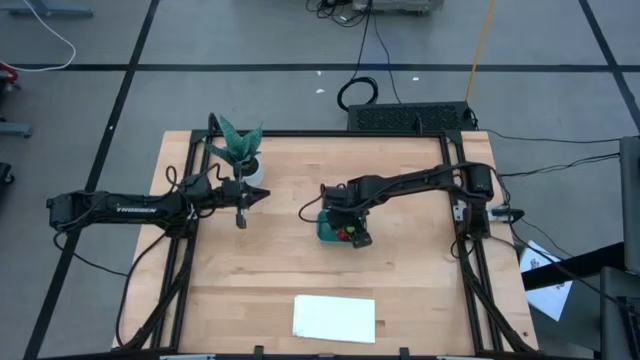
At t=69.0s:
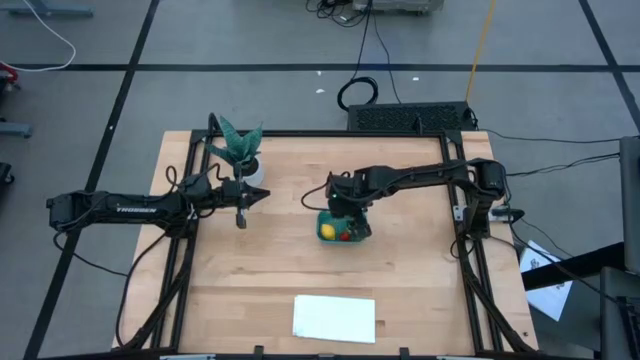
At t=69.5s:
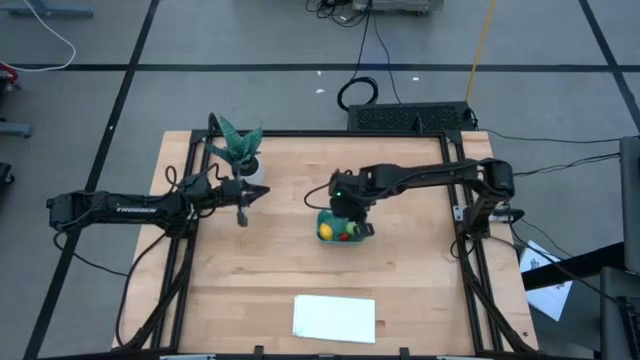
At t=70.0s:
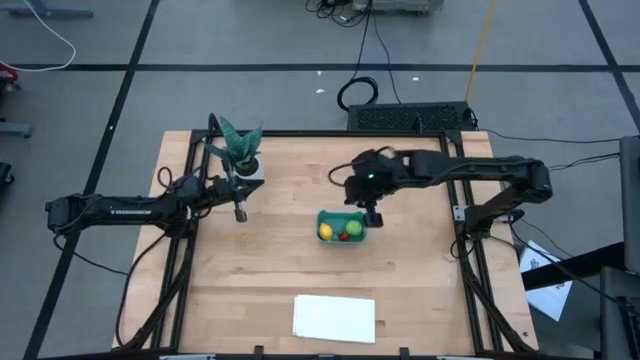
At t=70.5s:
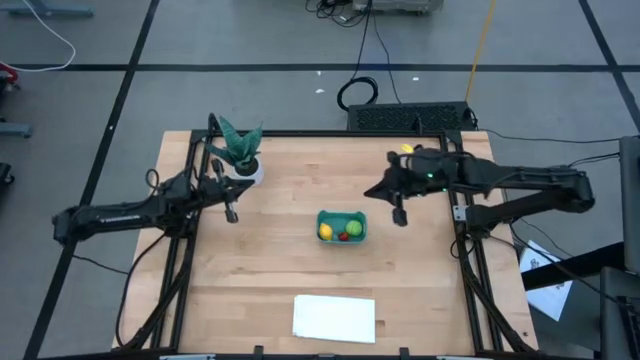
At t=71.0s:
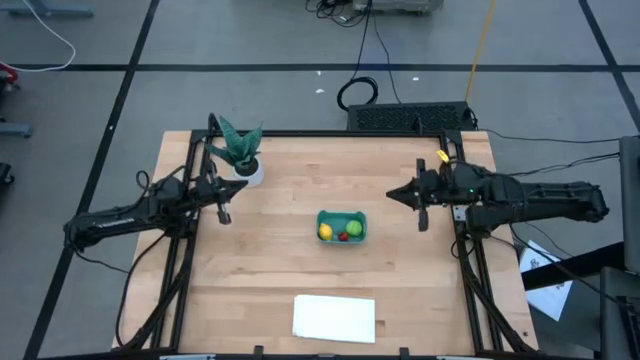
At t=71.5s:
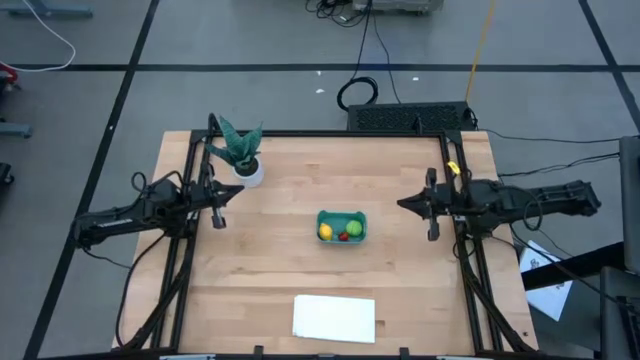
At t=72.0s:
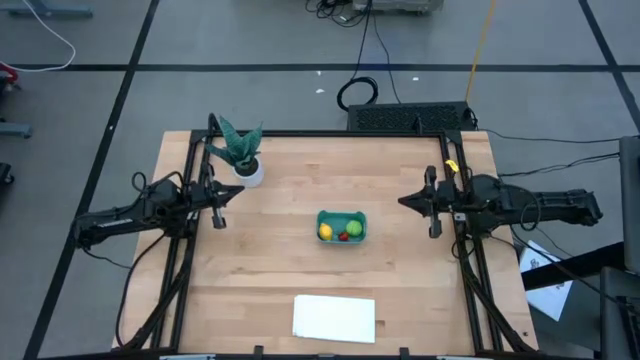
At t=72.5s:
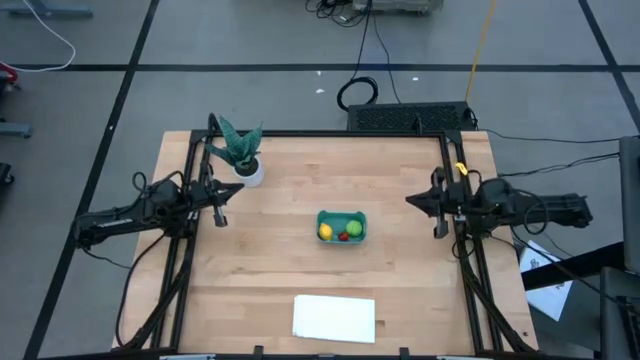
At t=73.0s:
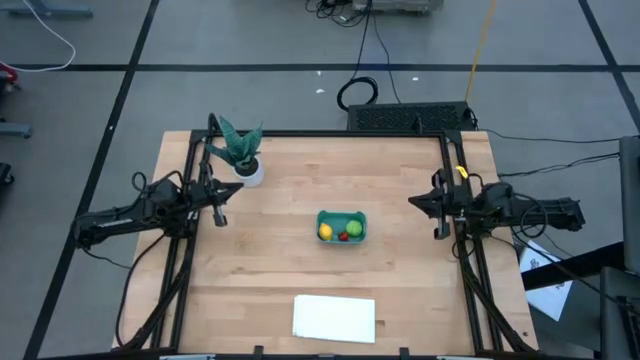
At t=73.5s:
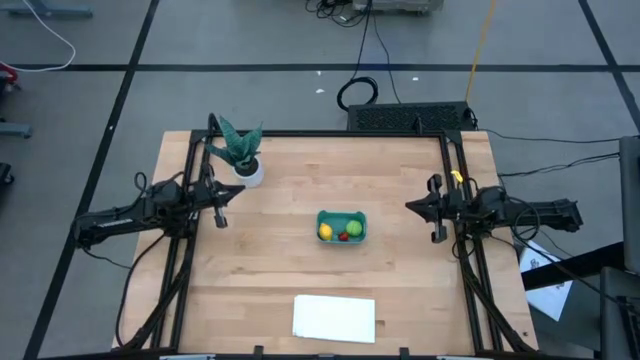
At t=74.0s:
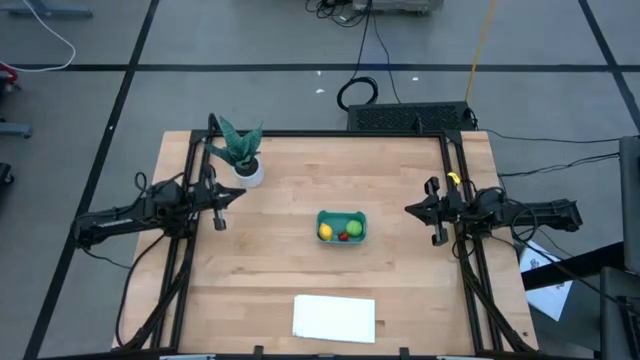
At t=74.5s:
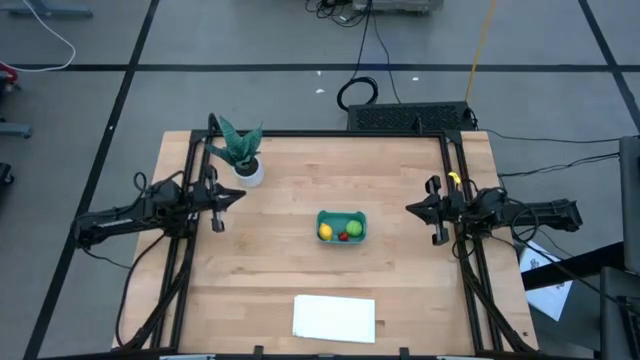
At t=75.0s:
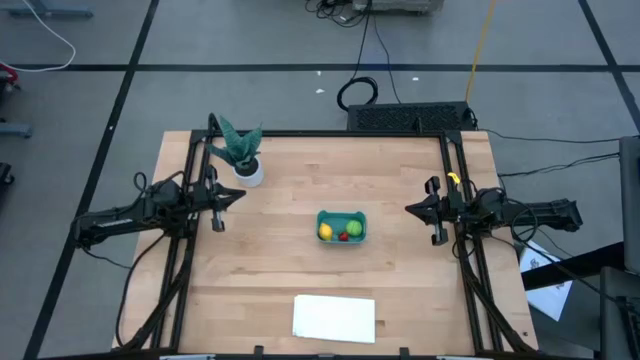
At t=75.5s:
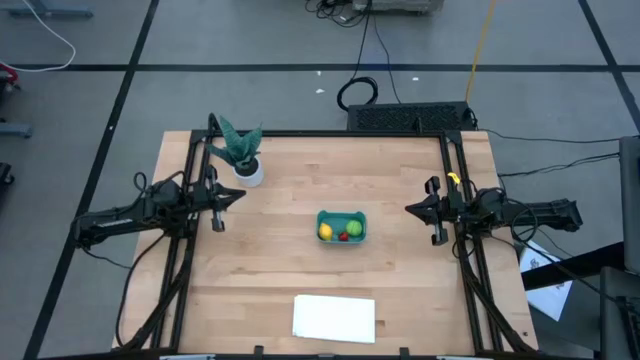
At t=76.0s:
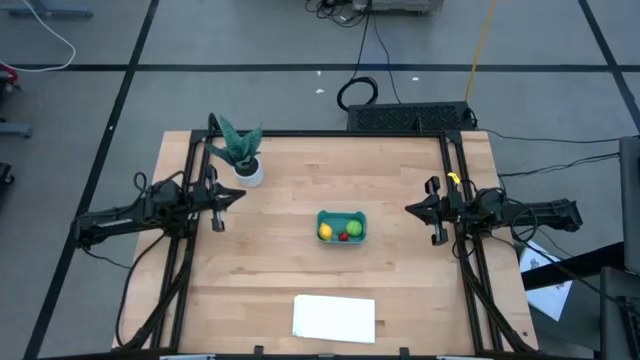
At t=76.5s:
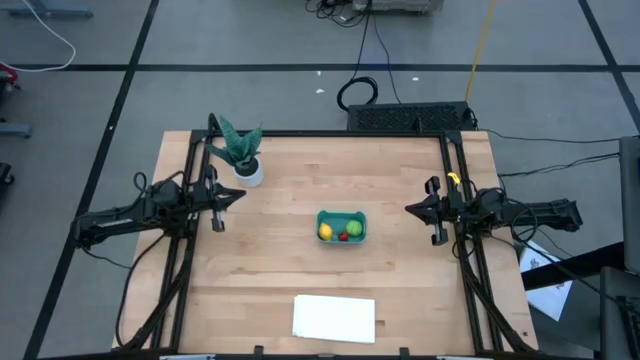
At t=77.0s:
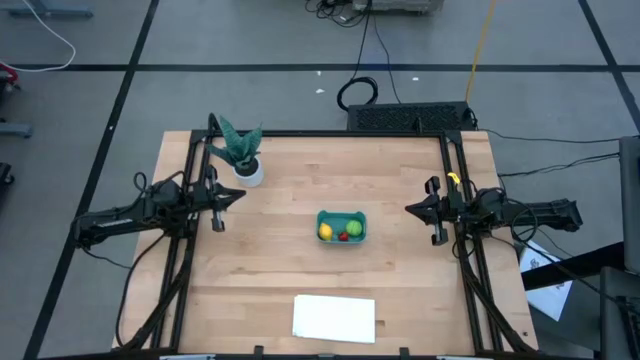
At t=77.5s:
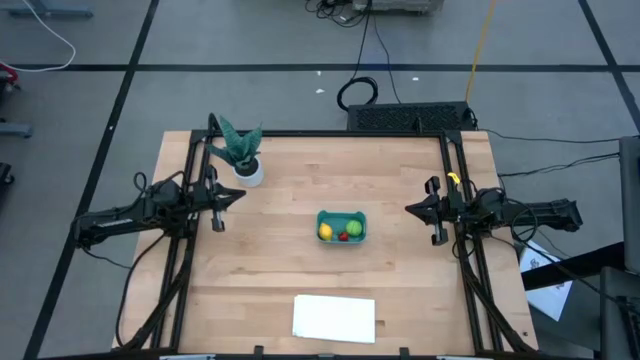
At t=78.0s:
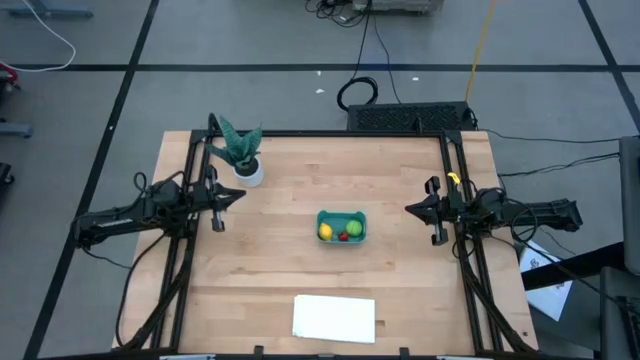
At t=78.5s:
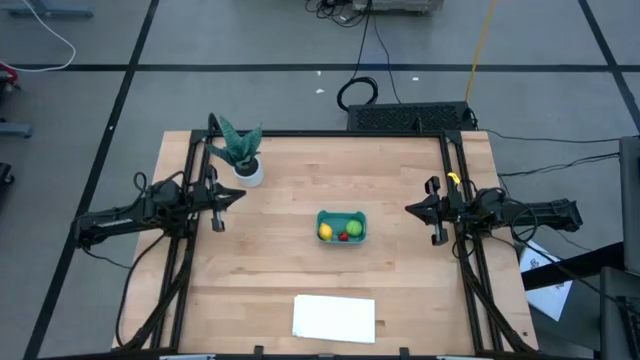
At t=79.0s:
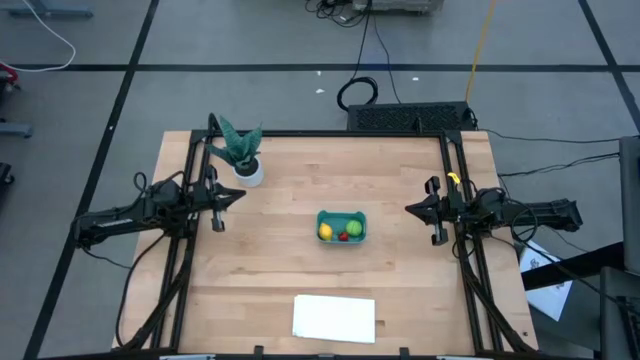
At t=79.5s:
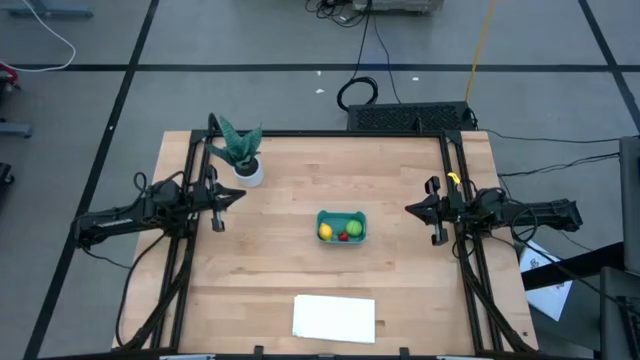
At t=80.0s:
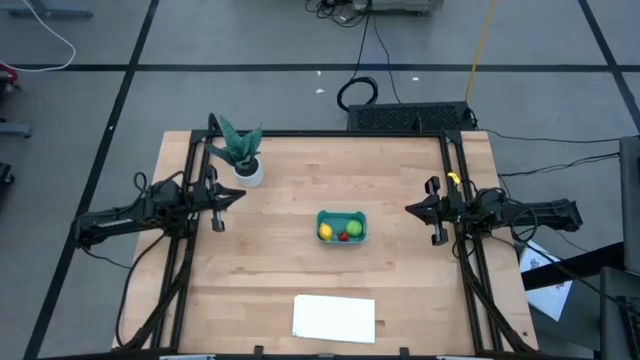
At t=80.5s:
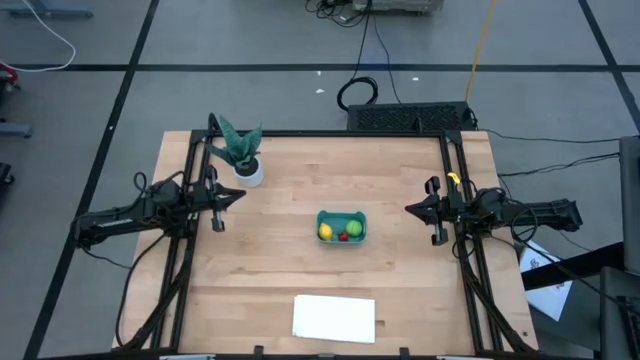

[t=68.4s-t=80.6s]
Task: Pick and placing Produce into tupperware
Return to Home Position

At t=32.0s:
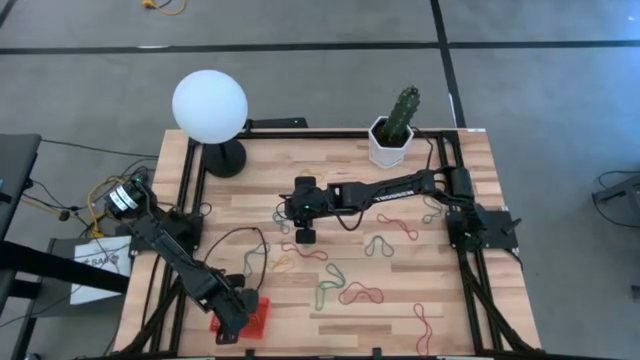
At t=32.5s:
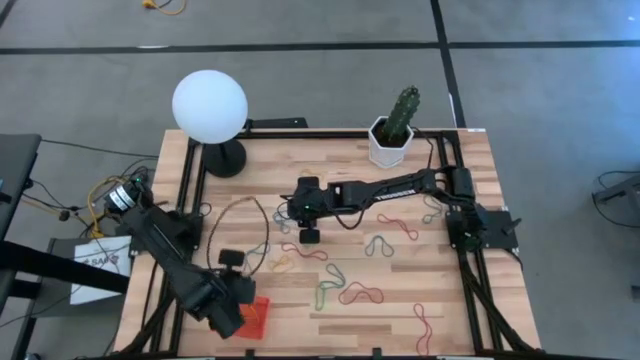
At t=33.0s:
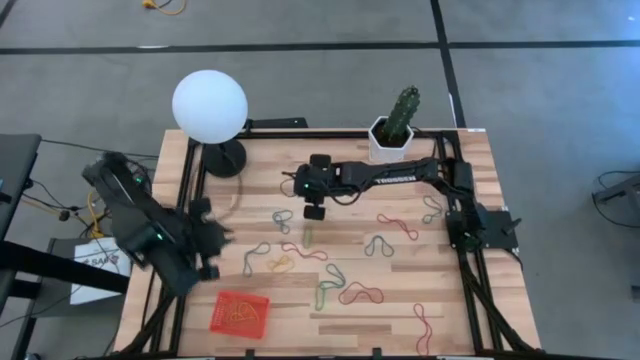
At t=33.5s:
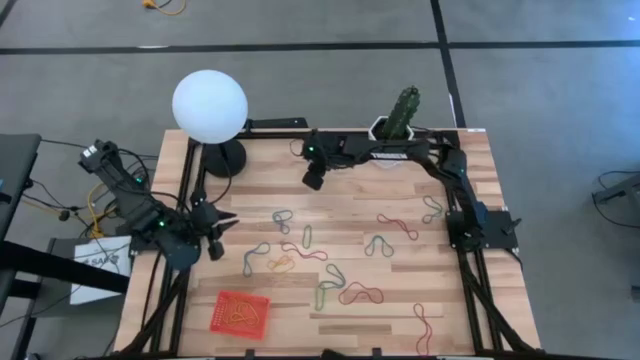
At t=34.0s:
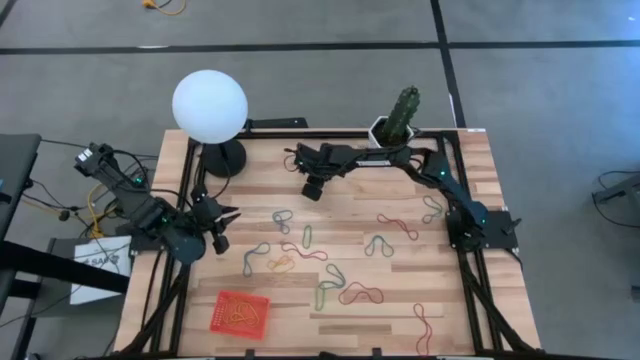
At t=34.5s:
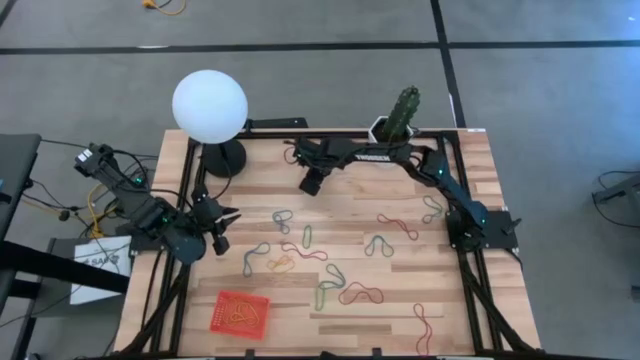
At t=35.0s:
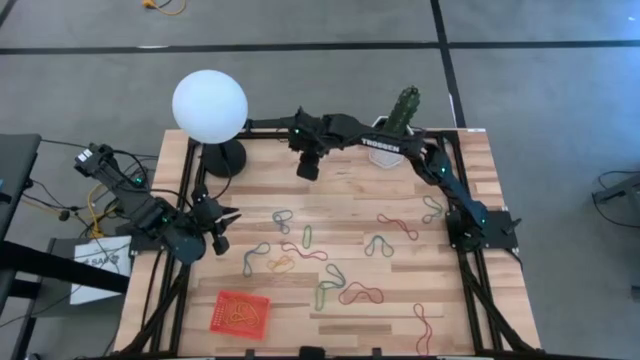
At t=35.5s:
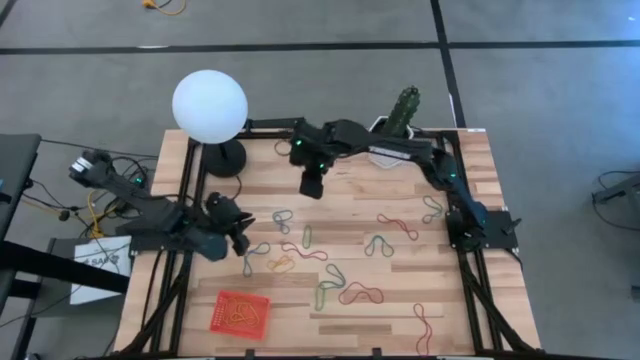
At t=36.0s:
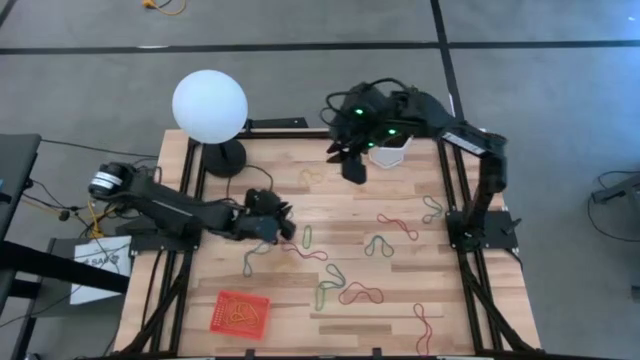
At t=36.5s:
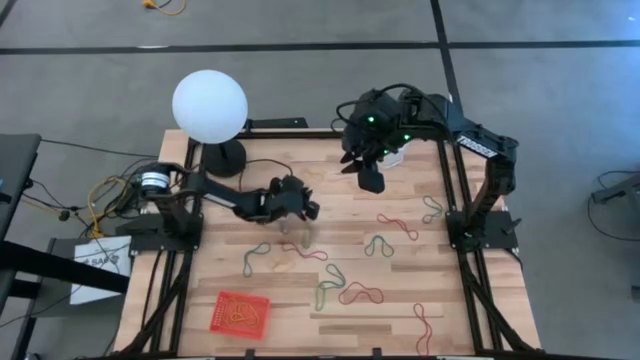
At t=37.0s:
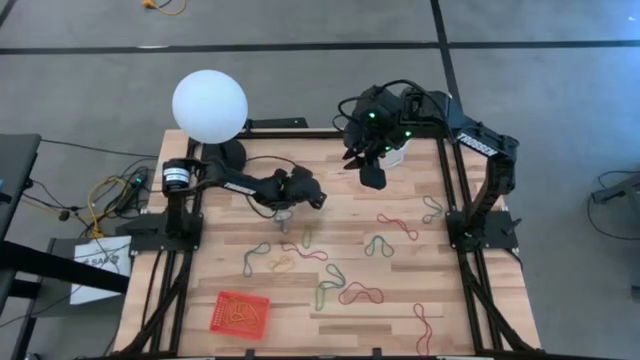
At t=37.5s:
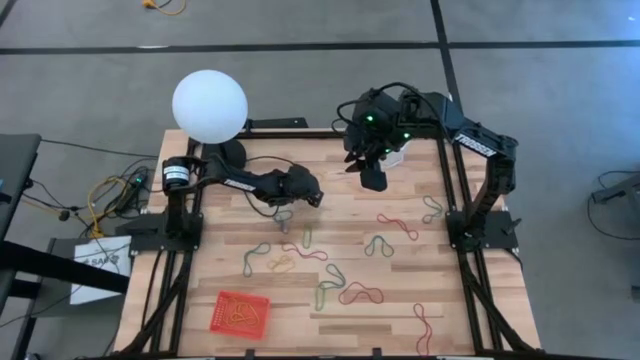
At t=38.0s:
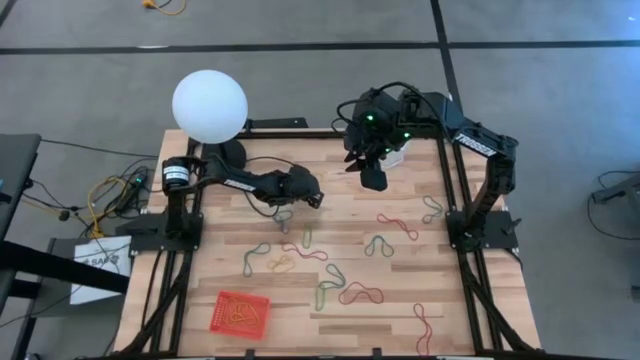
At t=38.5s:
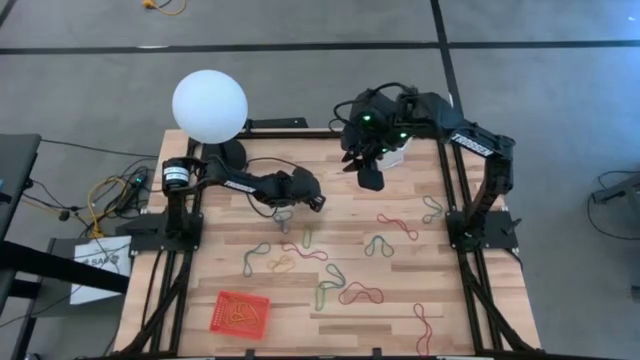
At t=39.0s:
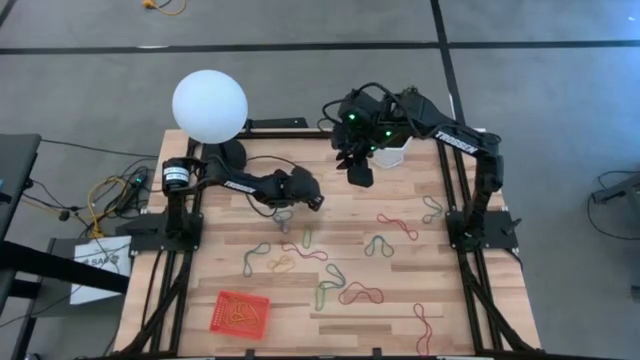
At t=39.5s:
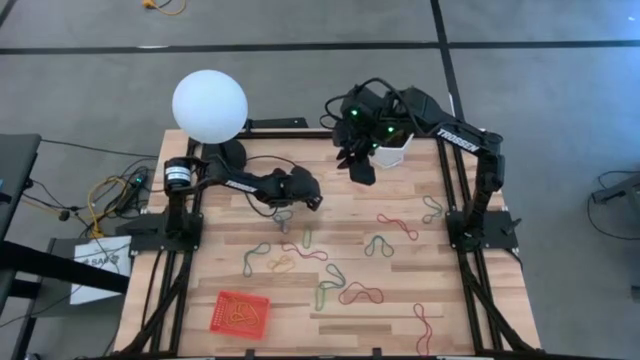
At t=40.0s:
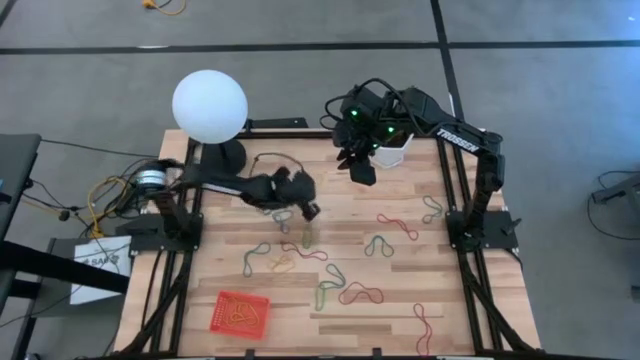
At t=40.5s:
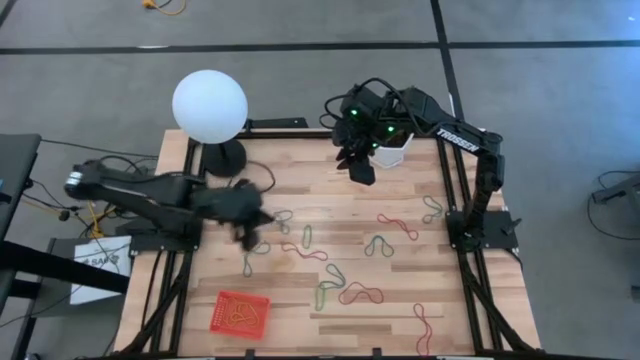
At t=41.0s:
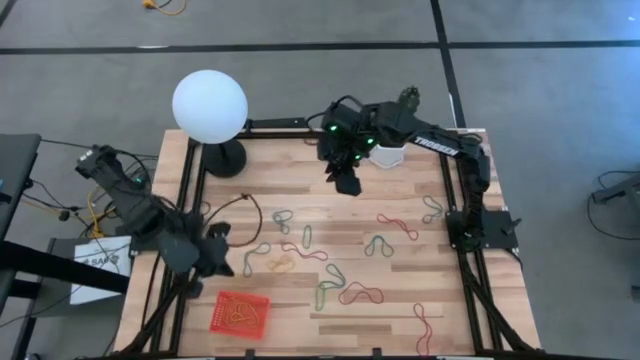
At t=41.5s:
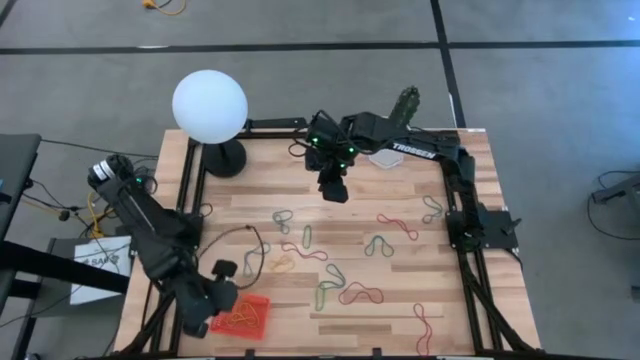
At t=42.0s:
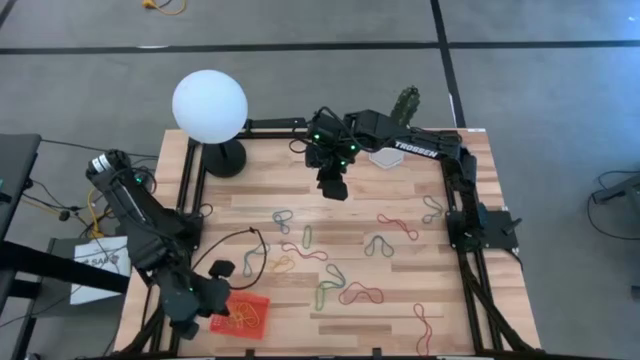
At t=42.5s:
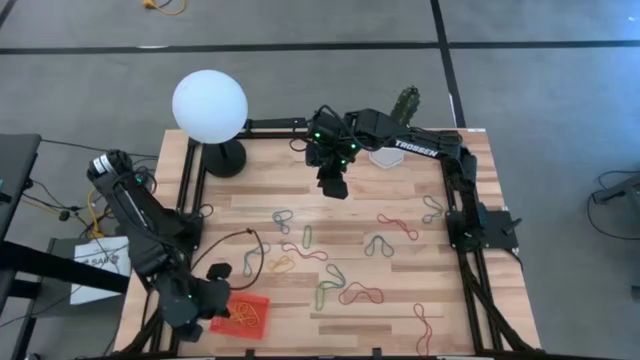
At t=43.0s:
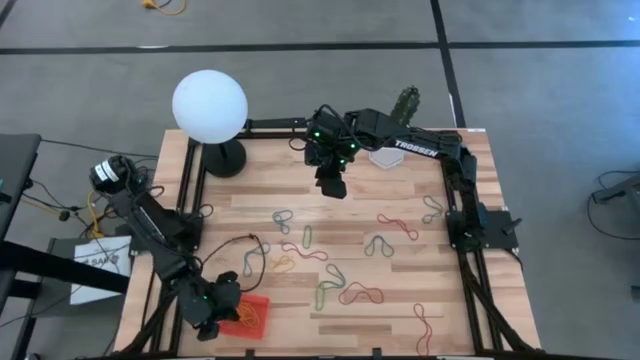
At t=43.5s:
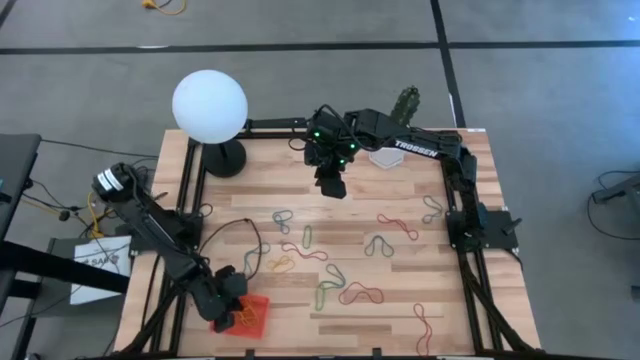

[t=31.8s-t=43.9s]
Task: Pick and place rubber bands into bin
Put the top yellow rubber band into the basket
